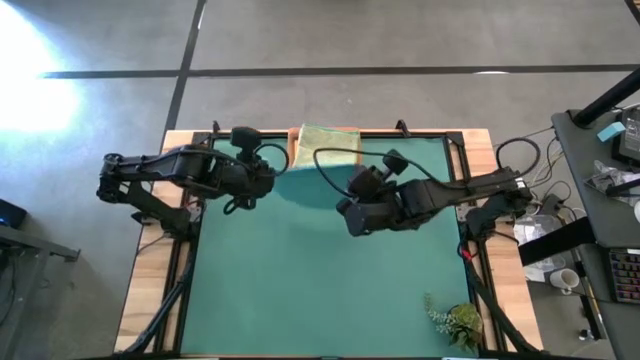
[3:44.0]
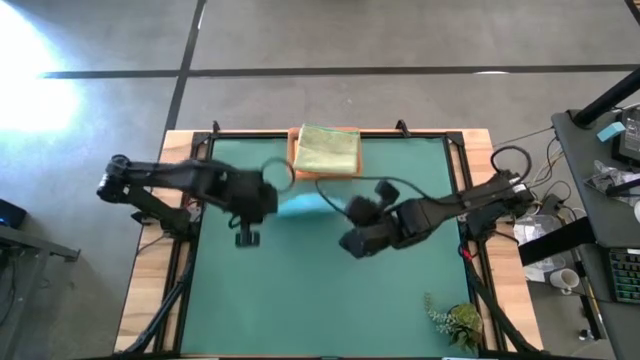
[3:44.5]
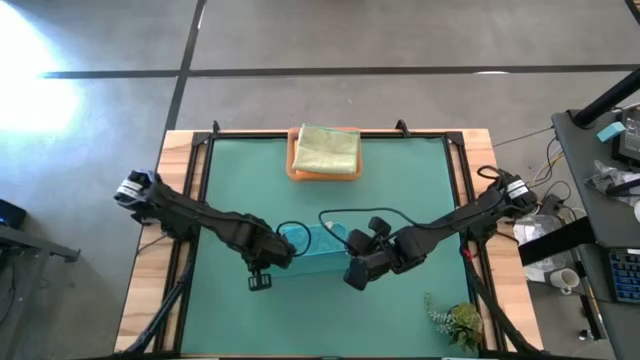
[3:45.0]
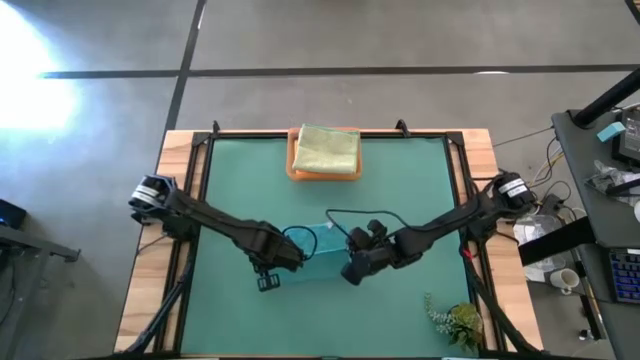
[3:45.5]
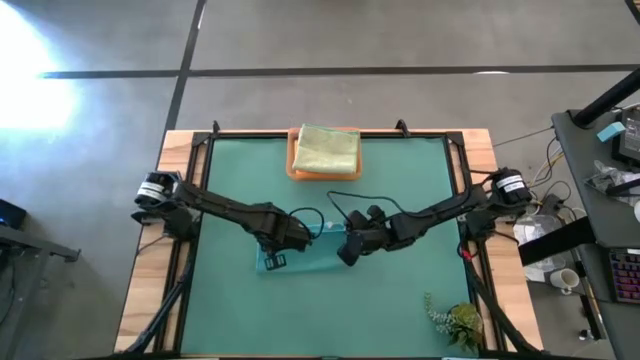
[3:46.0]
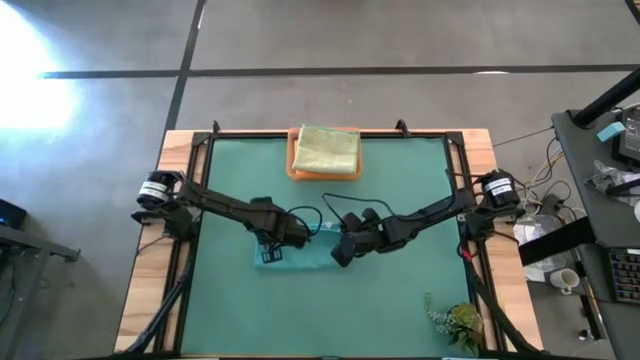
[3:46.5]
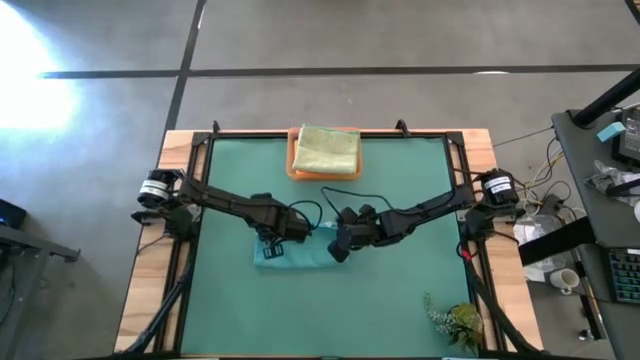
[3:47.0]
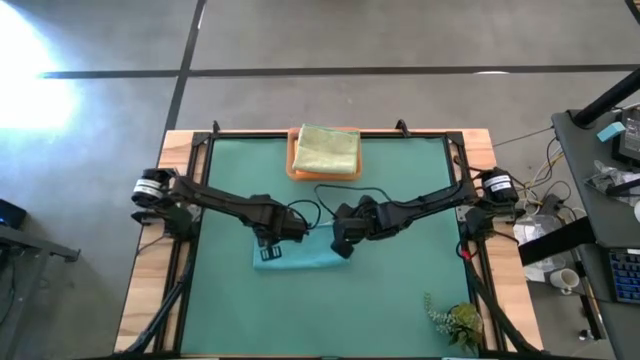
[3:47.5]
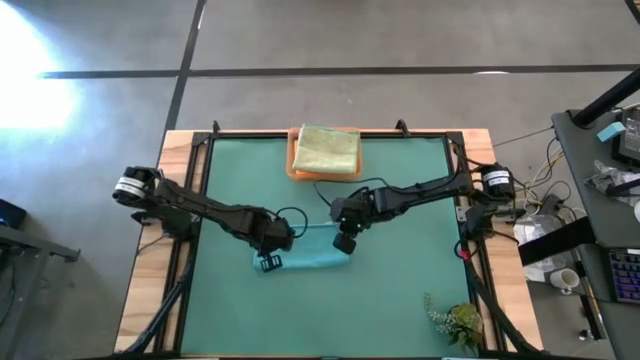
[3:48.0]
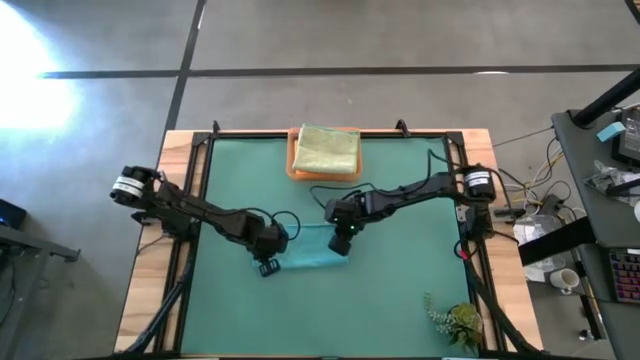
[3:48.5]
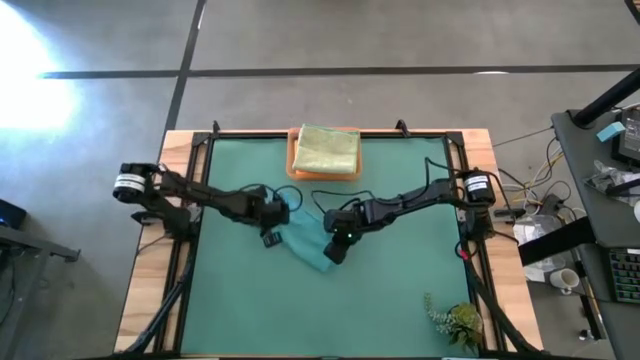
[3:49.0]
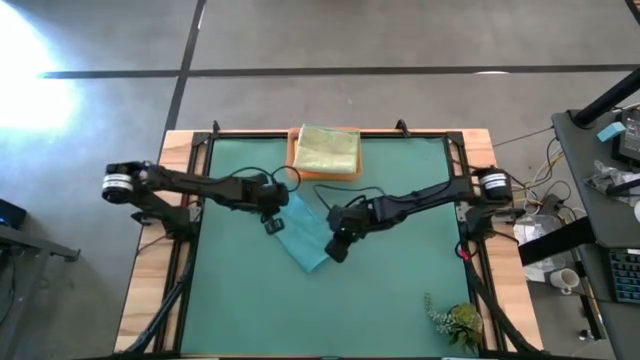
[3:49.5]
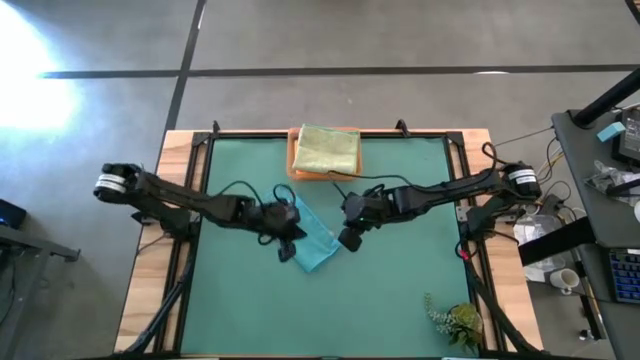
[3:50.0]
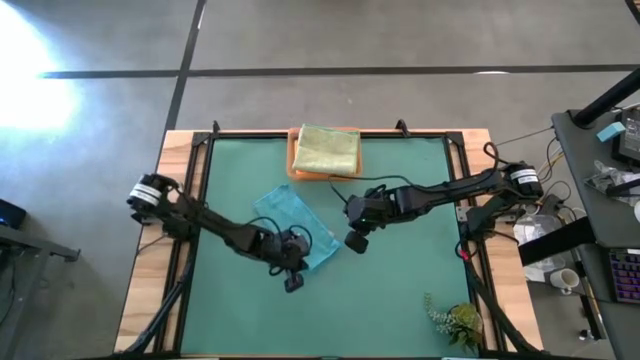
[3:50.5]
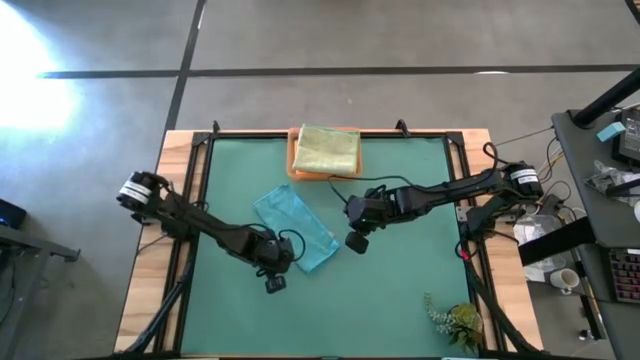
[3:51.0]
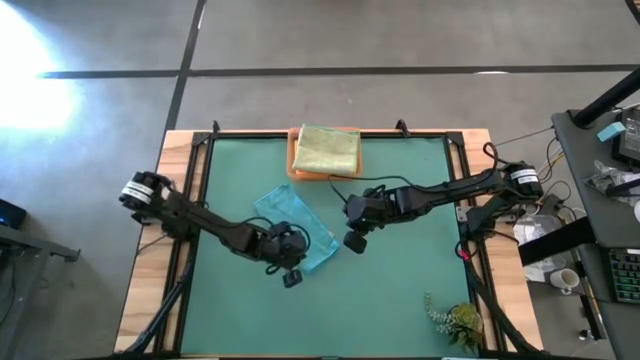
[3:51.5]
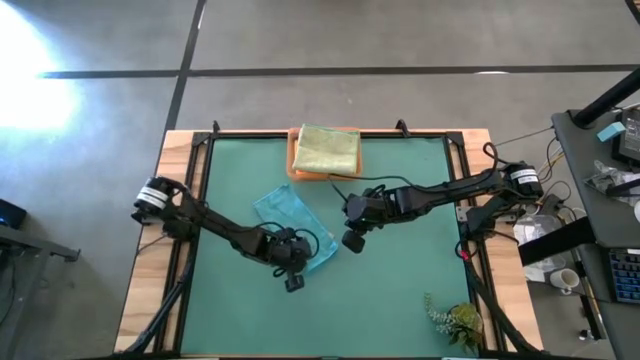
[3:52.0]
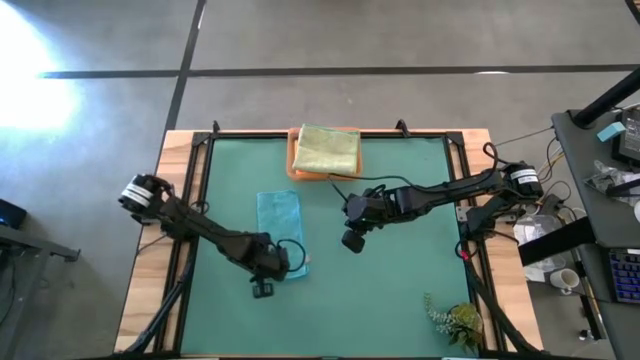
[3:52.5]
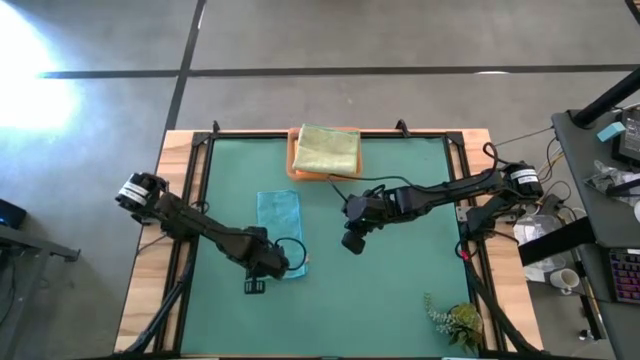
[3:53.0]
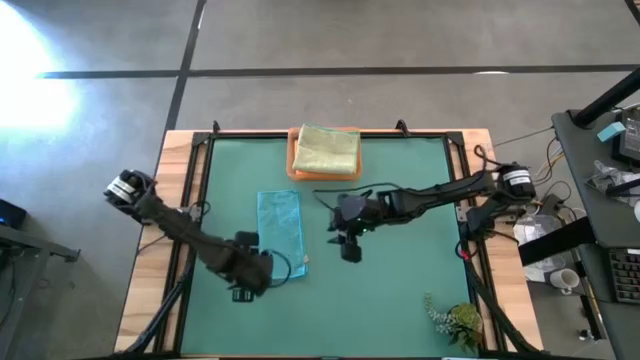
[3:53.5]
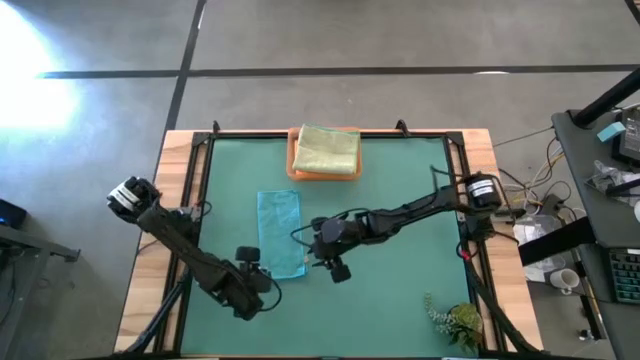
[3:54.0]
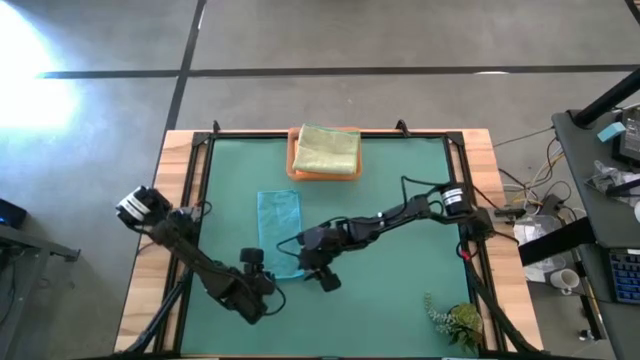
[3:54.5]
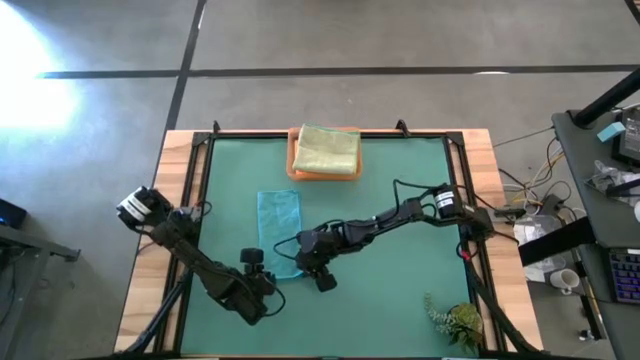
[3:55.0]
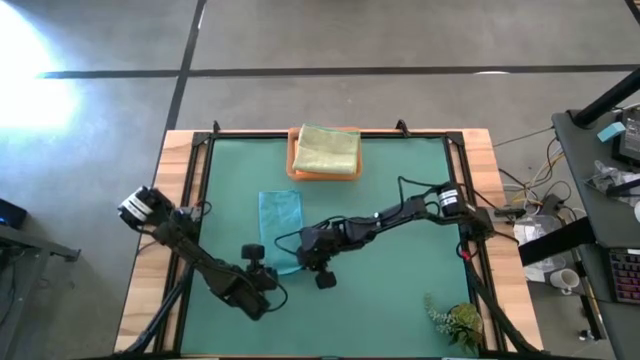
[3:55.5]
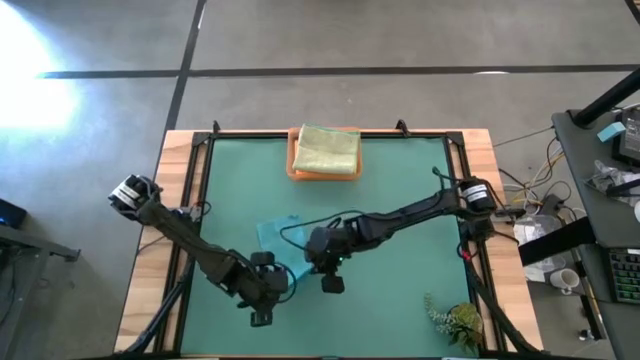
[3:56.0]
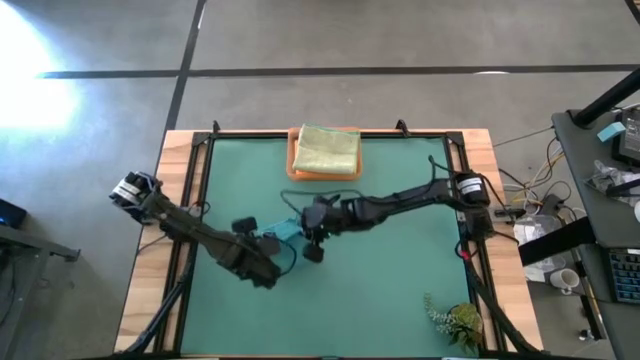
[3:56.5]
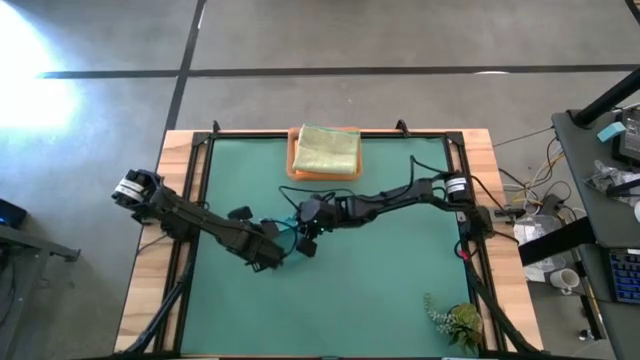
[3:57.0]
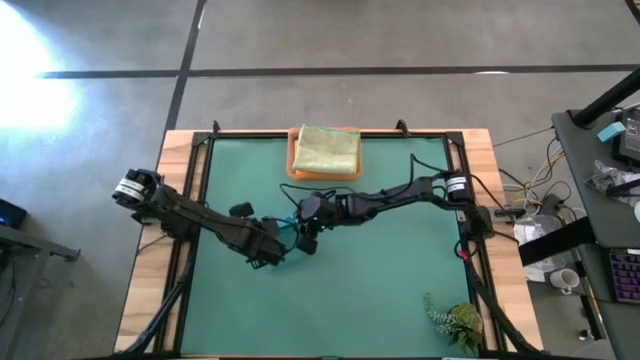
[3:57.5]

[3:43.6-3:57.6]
Task: Fold microfiber towels
Fold the blue towel

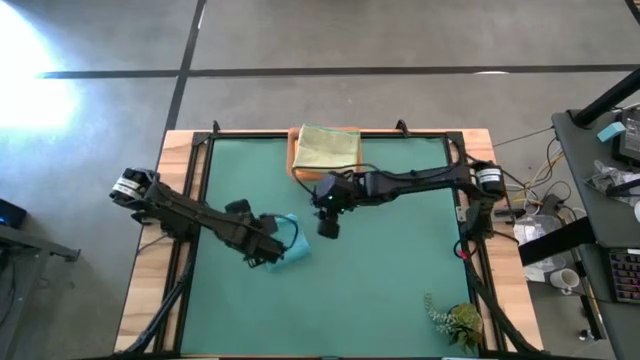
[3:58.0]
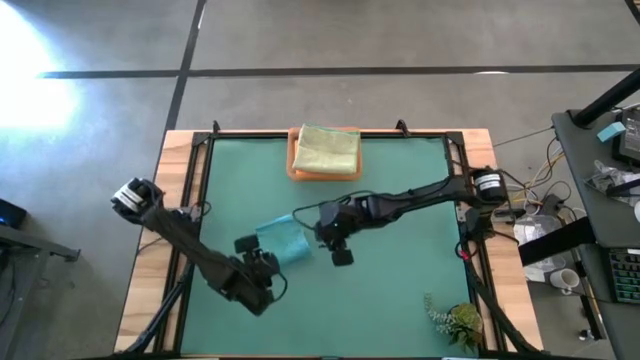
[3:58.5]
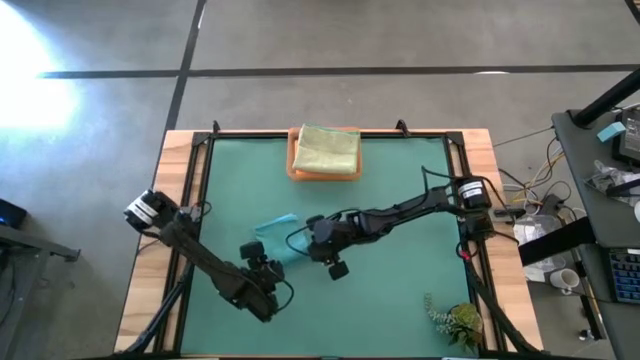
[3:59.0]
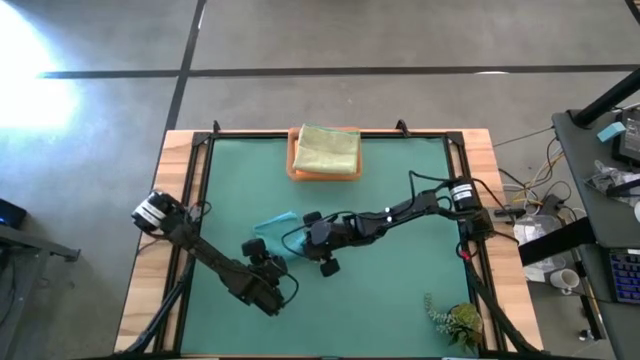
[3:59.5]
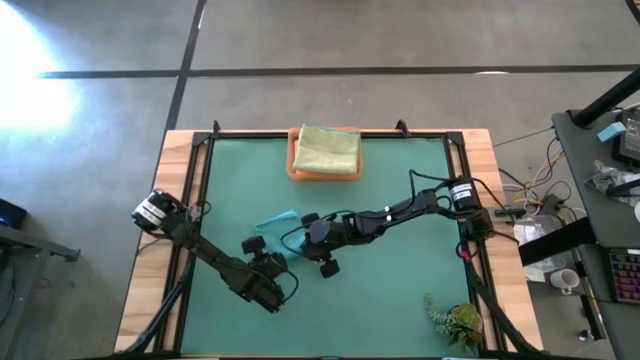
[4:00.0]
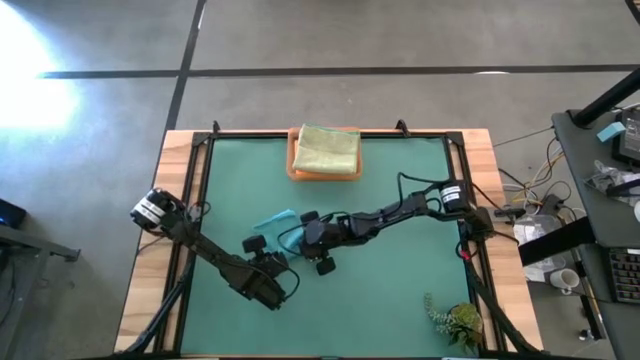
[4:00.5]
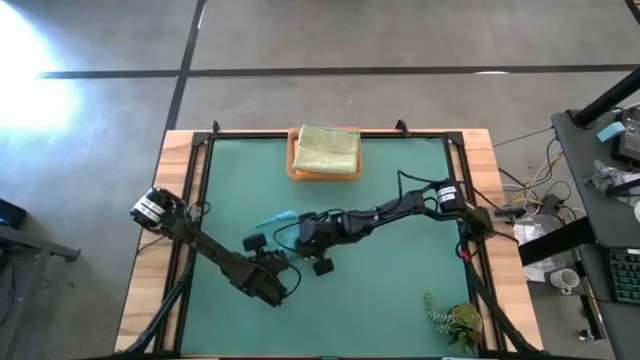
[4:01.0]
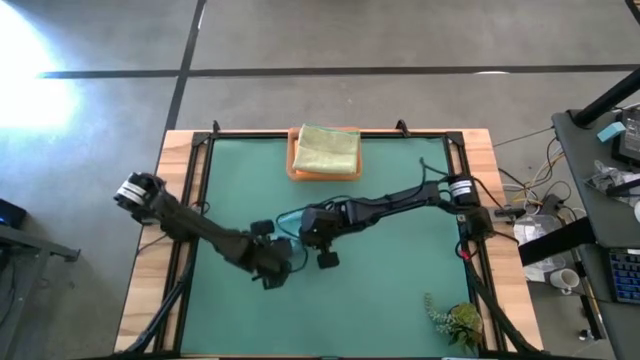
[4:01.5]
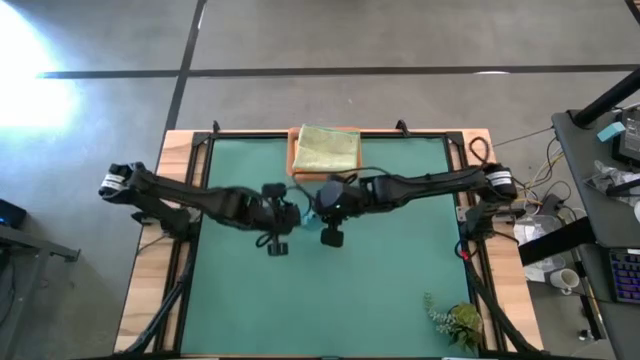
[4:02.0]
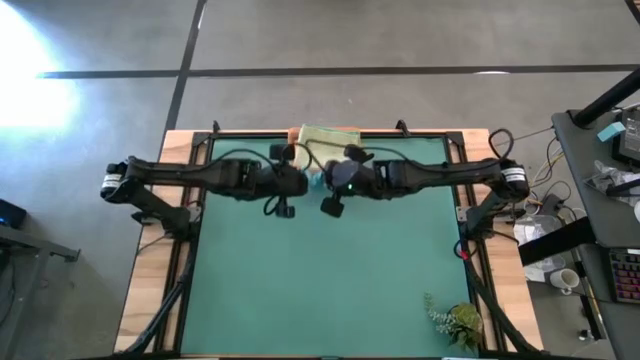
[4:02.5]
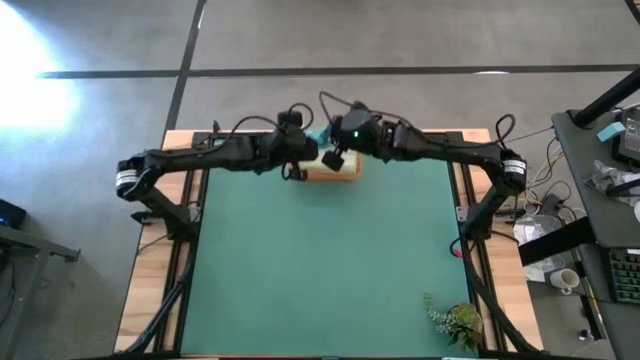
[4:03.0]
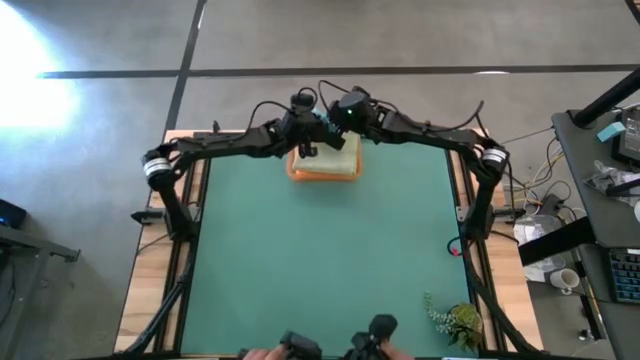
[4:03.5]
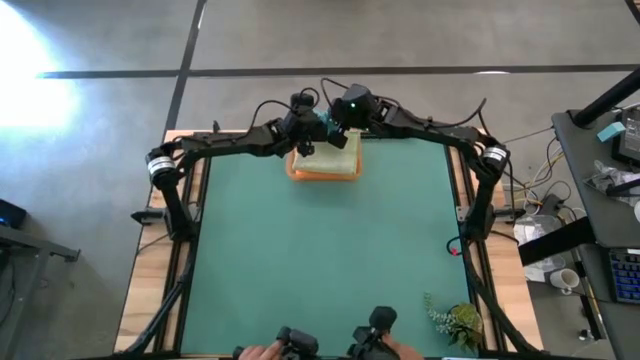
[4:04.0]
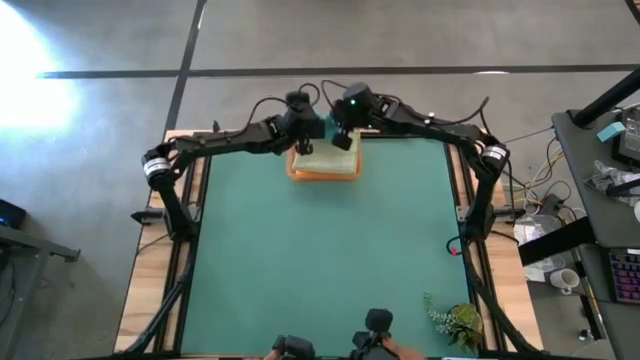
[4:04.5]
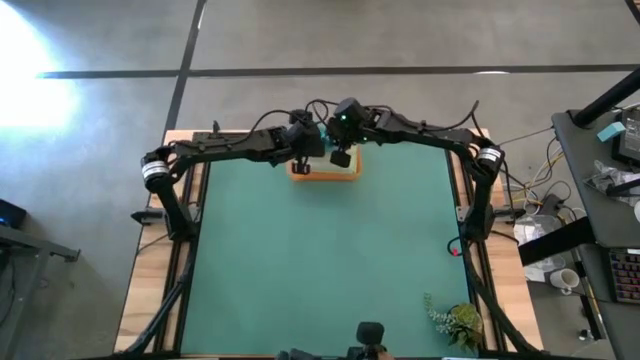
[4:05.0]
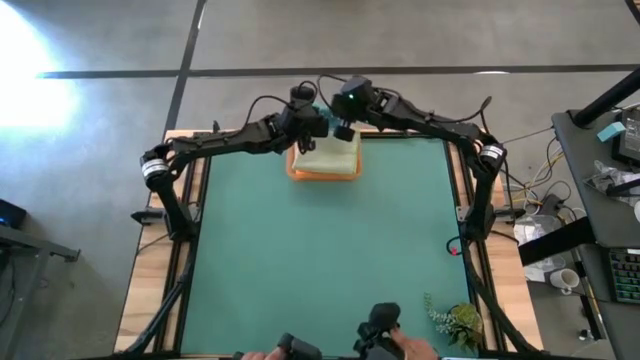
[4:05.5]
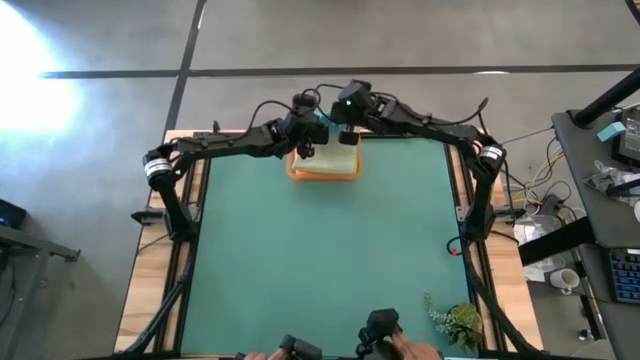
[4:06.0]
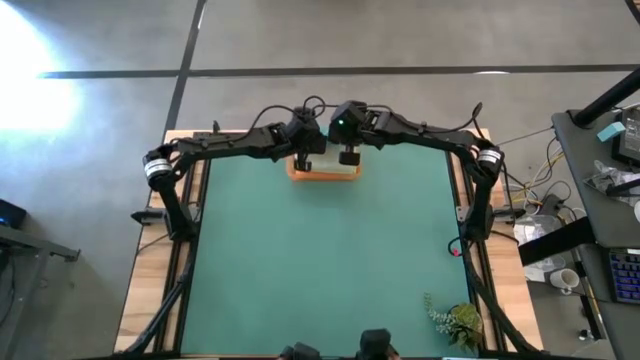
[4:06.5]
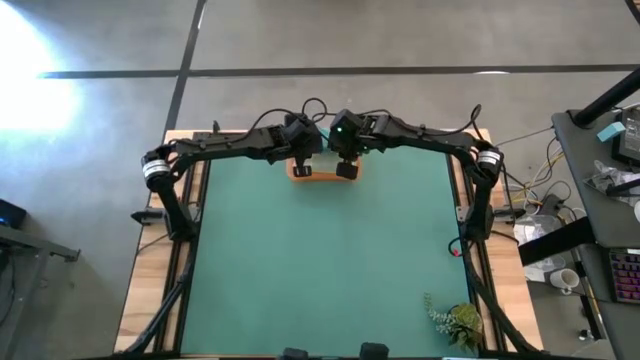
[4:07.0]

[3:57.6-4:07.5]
Put the blue towel into the orange bin
